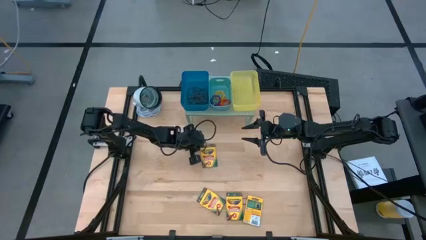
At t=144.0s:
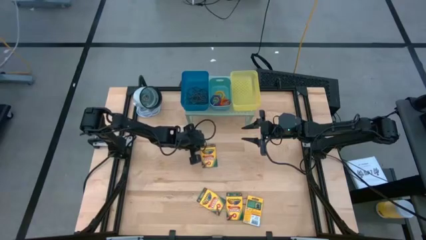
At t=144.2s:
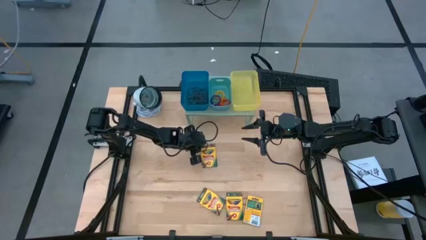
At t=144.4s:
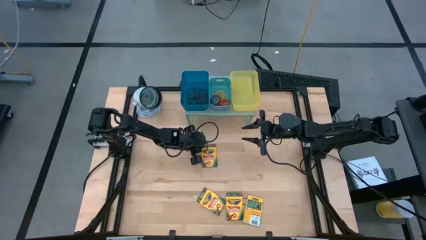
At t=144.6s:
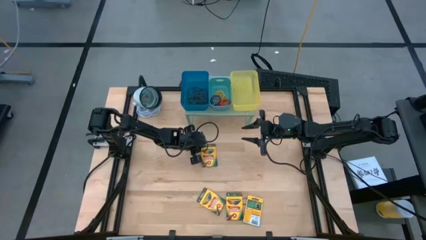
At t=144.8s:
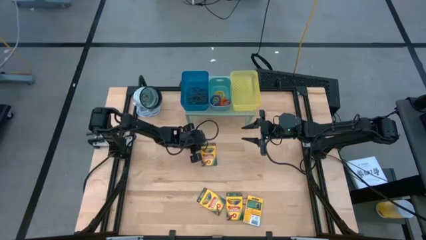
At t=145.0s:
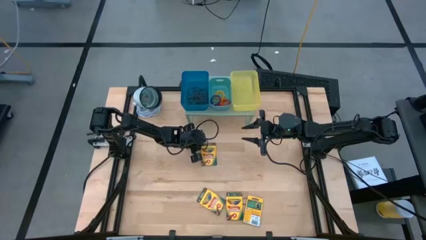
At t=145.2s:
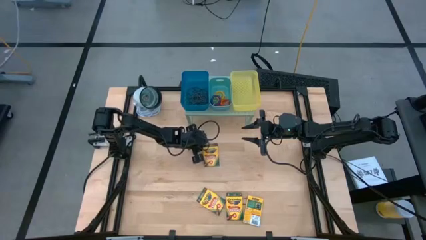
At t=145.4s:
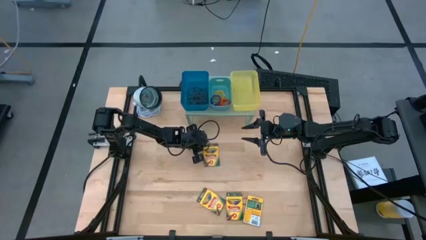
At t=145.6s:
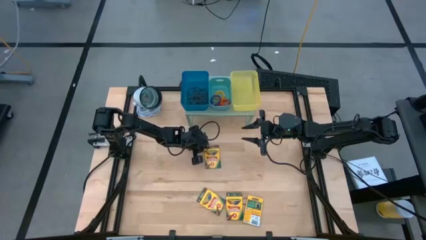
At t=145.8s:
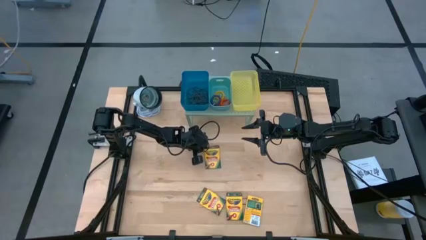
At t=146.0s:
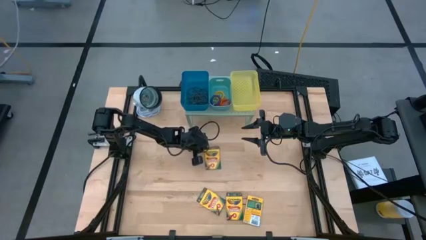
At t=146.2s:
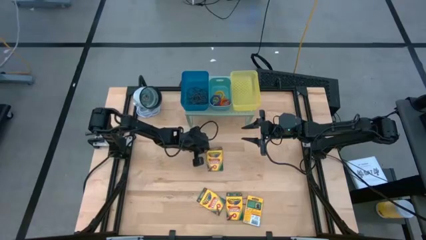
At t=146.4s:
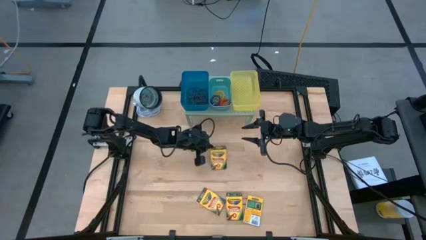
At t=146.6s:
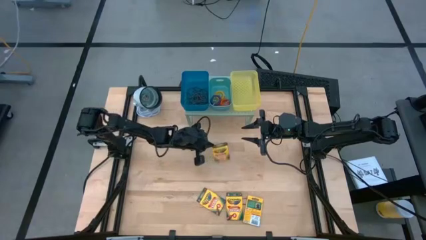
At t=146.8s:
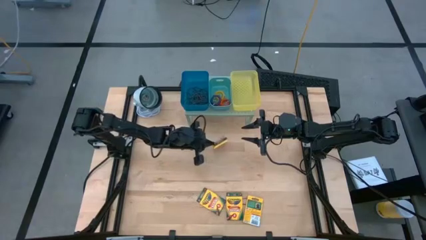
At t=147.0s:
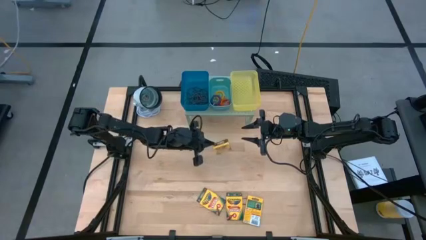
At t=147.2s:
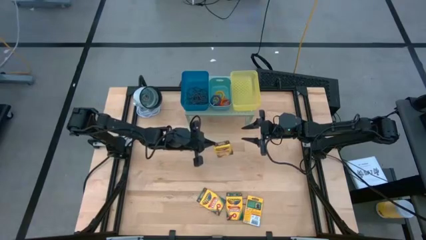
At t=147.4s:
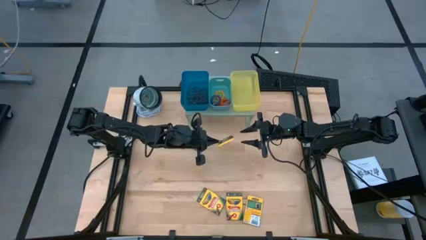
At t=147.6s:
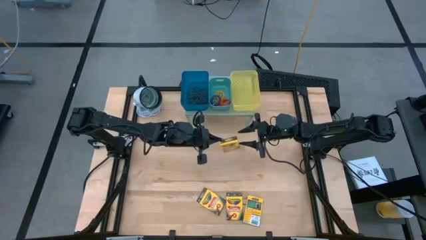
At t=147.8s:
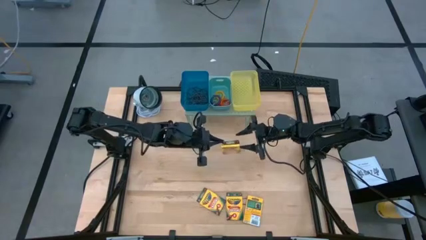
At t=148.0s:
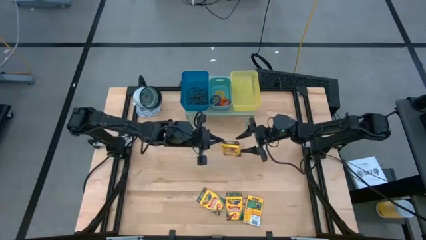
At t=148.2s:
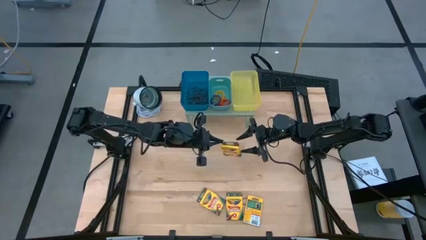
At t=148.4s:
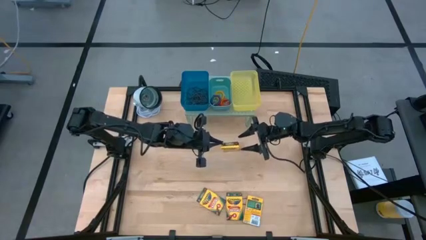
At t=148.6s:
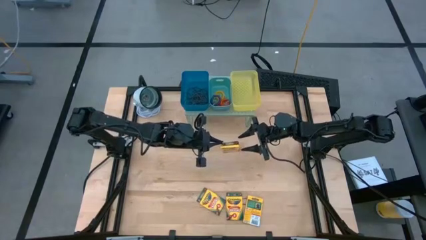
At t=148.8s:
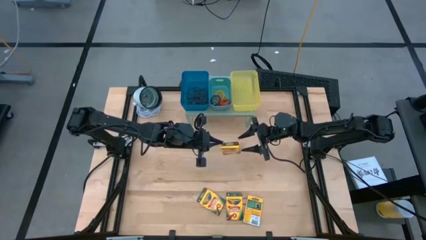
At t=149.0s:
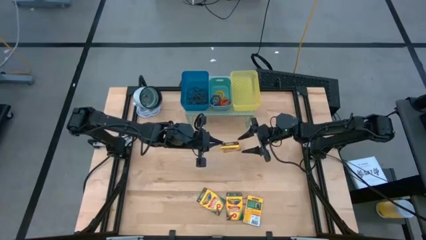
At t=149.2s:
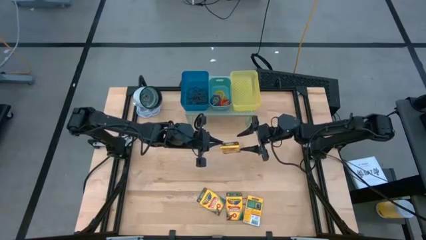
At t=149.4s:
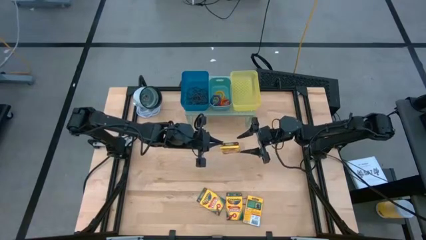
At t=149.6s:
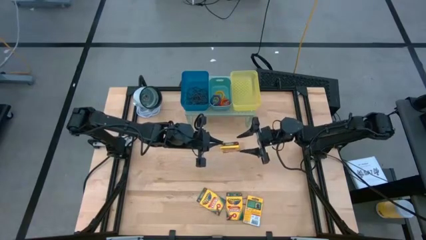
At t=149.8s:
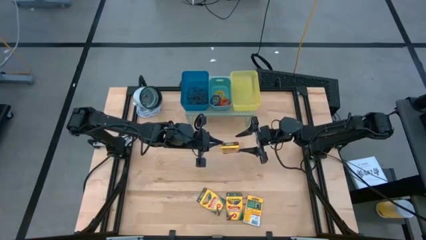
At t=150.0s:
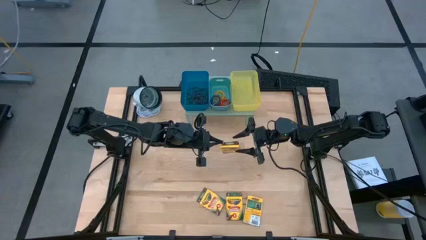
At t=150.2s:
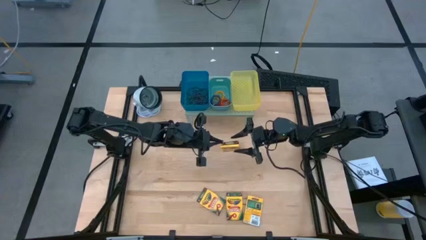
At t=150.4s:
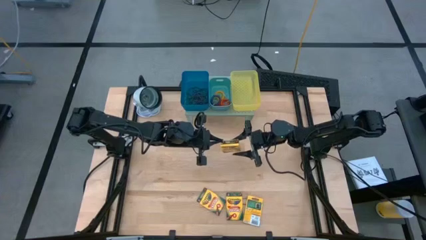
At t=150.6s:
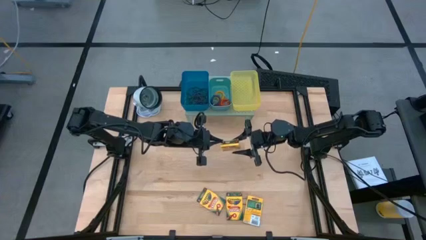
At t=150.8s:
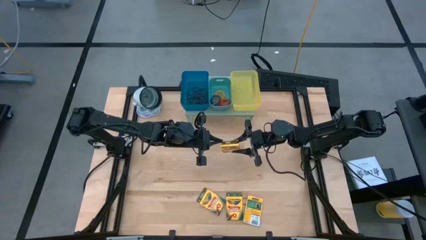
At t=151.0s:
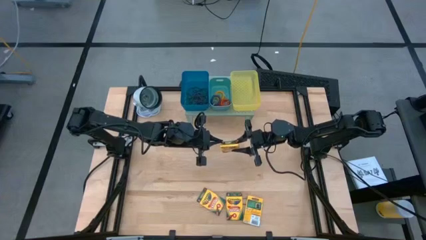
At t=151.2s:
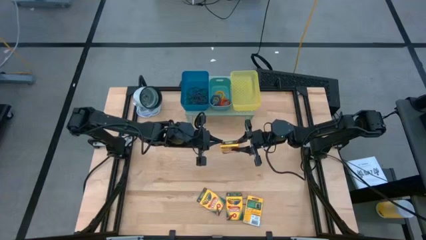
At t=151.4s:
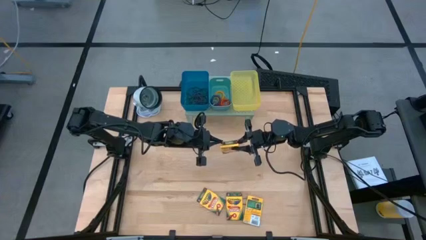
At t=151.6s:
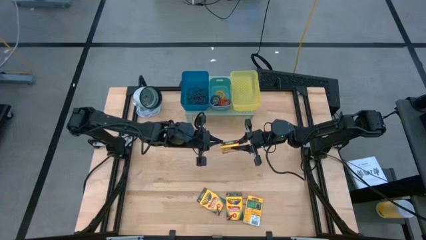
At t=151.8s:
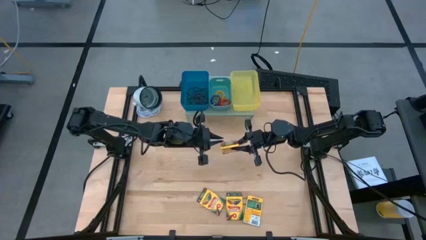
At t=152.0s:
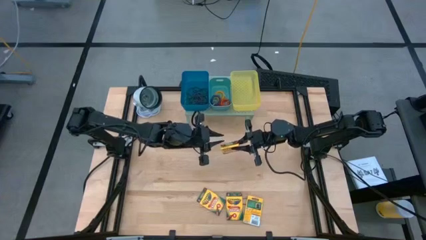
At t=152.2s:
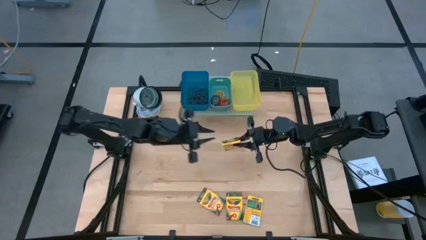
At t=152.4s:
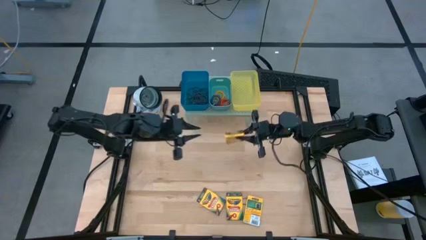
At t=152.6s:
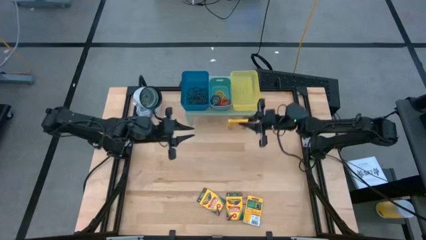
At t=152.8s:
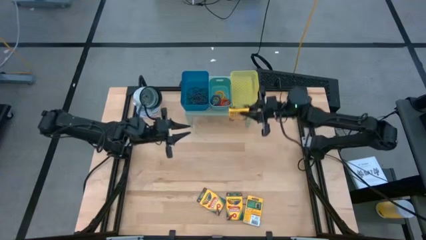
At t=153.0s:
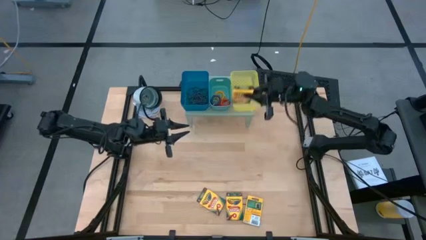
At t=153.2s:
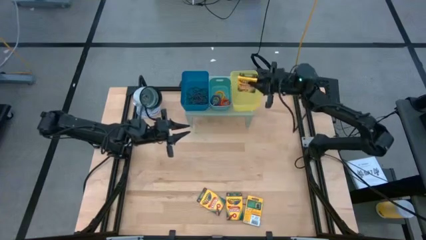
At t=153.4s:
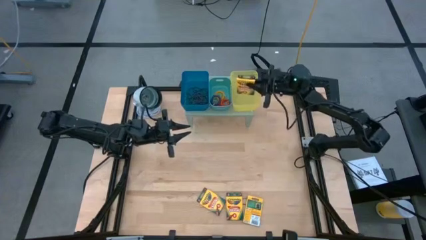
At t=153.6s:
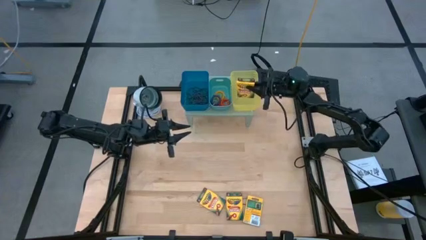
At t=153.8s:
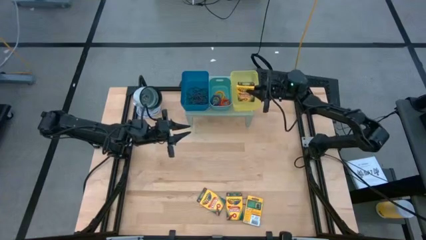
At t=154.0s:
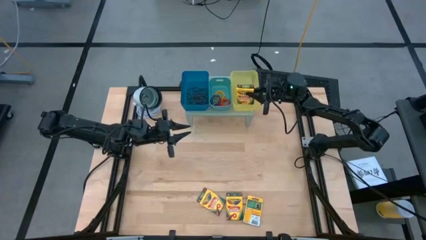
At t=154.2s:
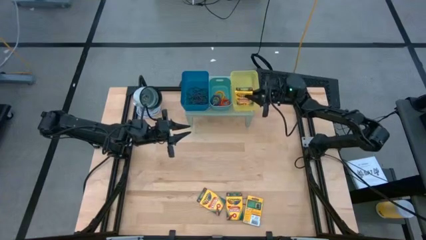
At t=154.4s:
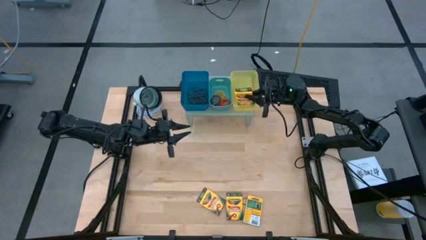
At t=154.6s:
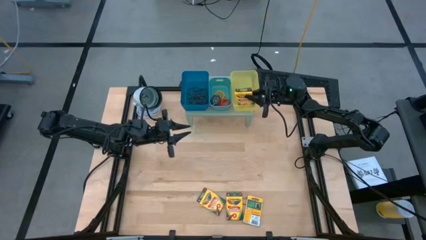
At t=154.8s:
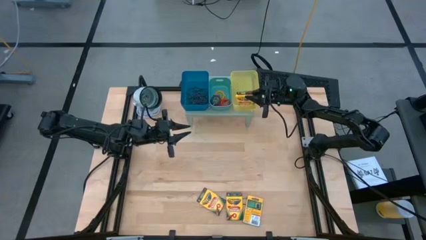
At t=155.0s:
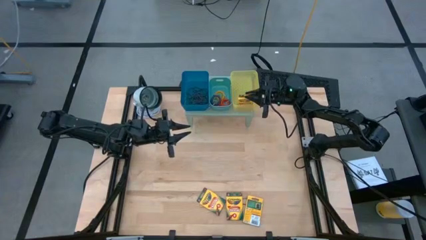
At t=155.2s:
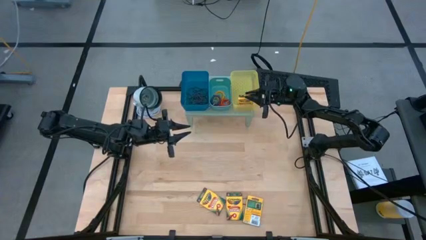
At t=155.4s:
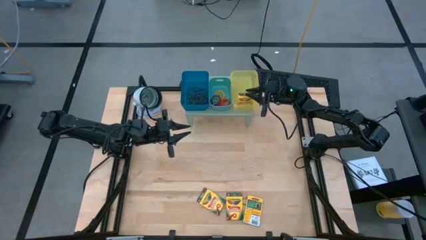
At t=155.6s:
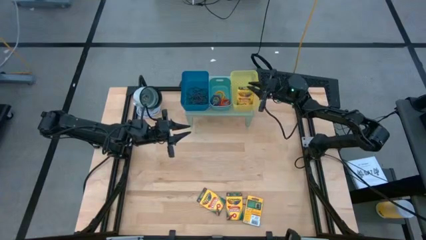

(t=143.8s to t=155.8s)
Task: Pick & Place Office Desk Supplies
Put the yellow crayon box into the yellow bin on the shelf

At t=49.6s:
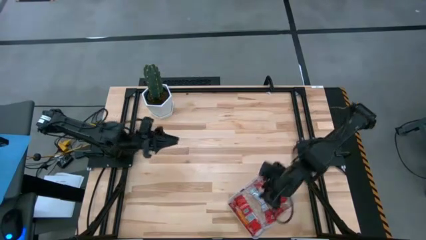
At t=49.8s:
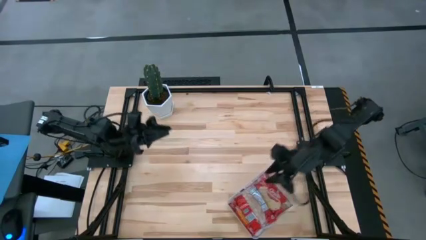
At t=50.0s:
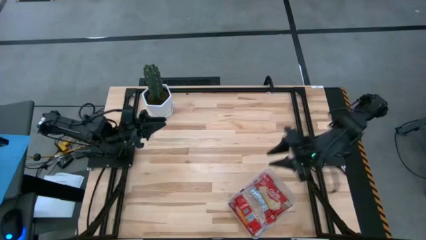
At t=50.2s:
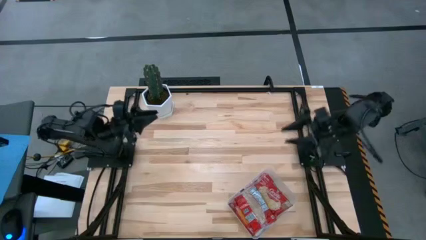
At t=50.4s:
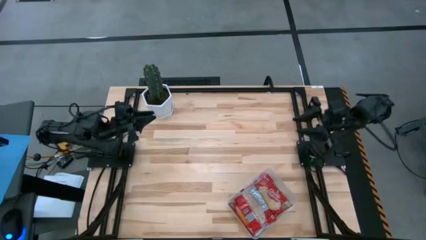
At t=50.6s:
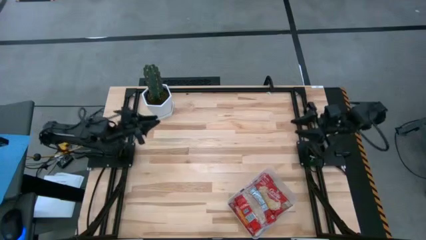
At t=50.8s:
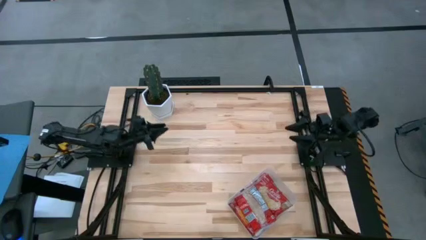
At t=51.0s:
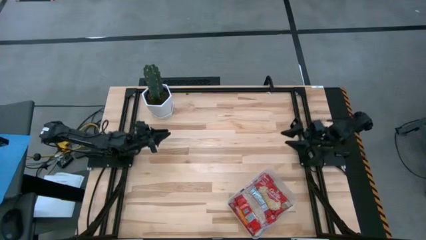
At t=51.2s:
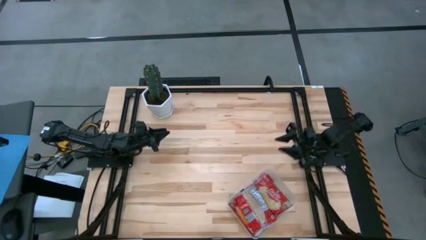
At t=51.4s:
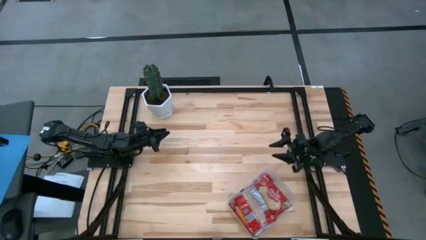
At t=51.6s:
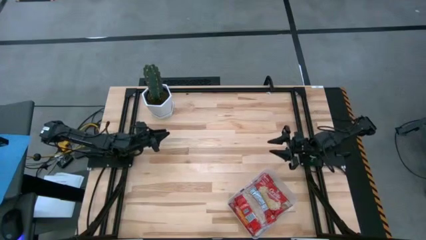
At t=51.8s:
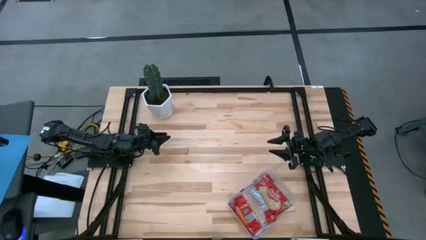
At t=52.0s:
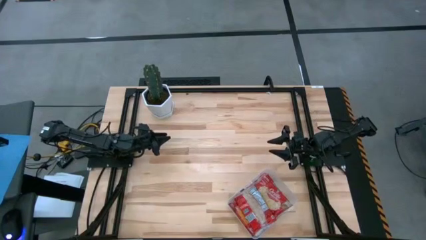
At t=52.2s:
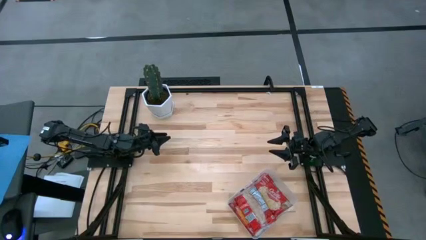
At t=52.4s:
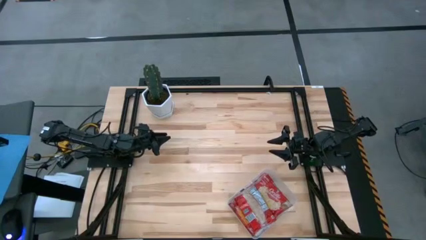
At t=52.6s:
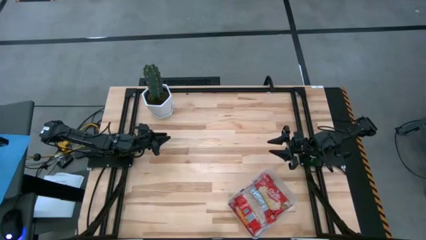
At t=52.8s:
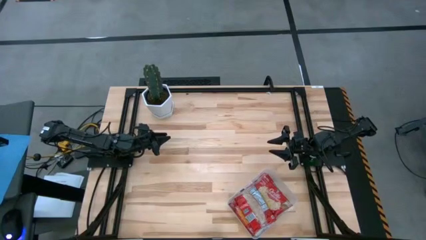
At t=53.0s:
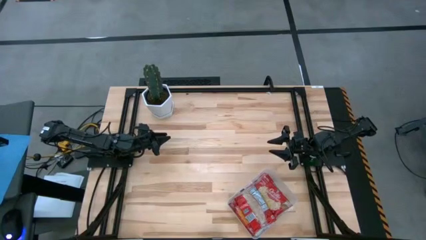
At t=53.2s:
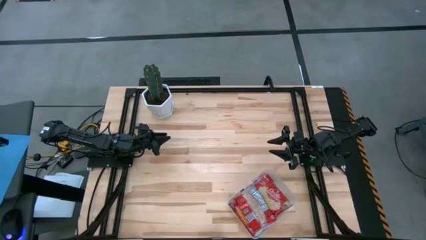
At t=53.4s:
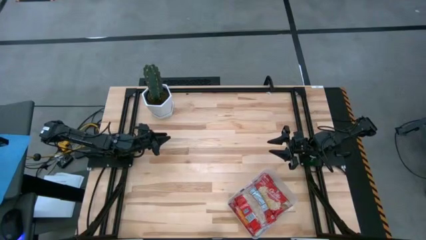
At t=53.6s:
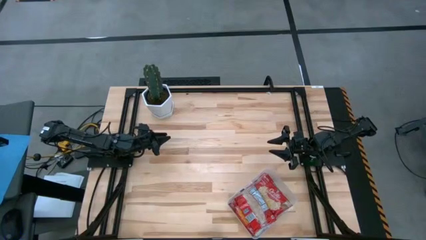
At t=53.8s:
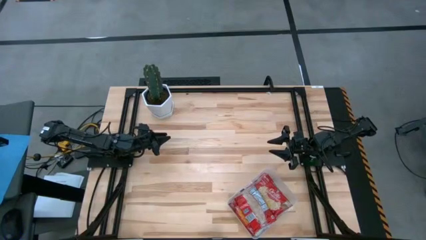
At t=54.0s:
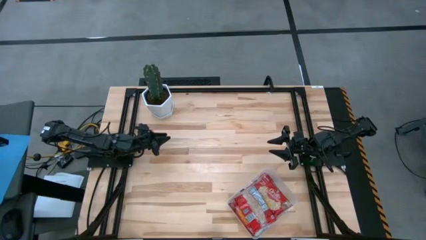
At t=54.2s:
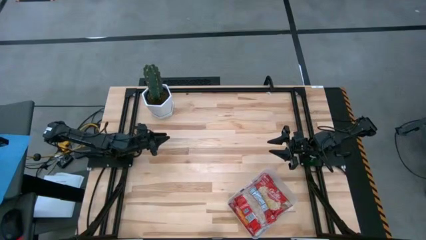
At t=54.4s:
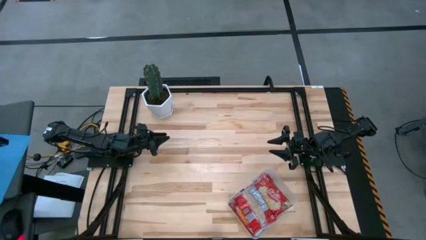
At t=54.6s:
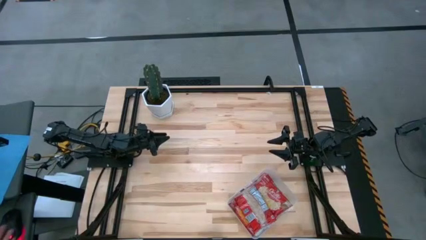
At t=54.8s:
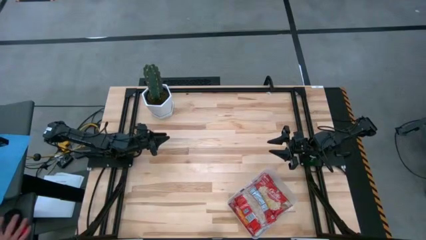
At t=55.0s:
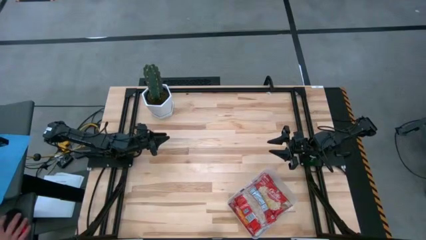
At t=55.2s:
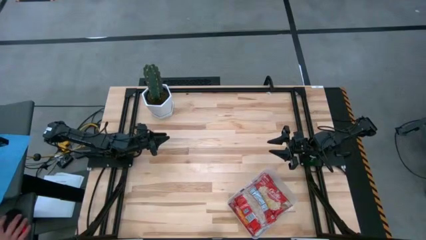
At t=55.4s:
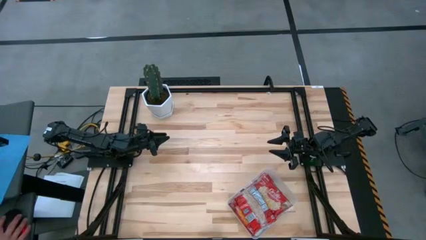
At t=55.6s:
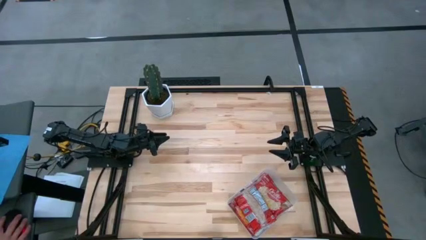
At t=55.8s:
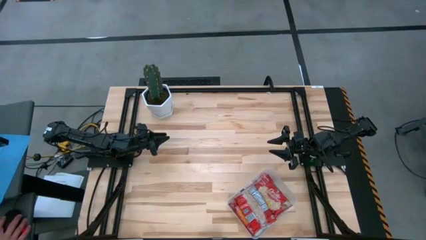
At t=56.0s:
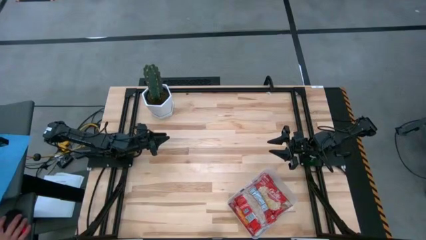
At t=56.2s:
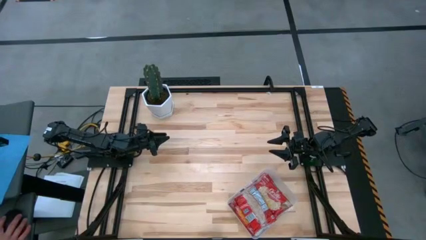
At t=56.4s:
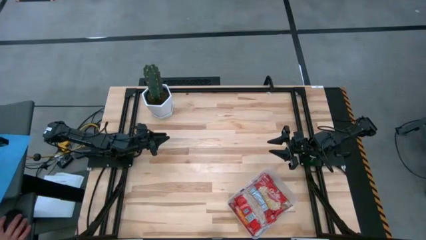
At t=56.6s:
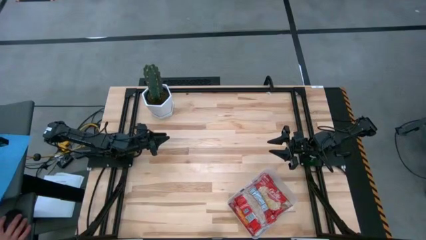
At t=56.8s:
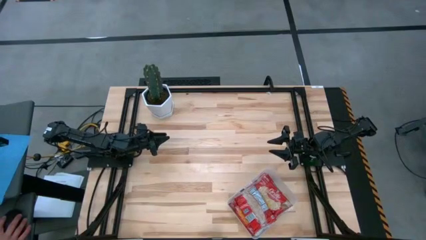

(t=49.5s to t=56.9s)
Task: Sort popcorn bags into baskets
Return to Home Position
